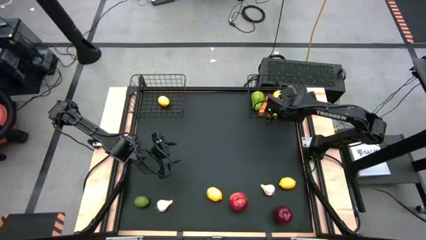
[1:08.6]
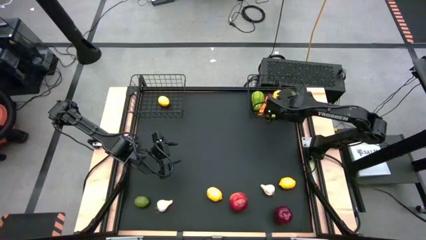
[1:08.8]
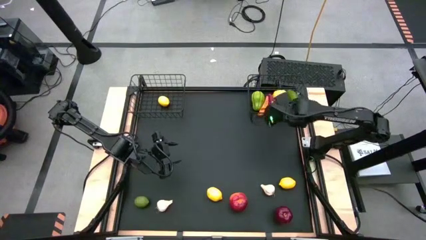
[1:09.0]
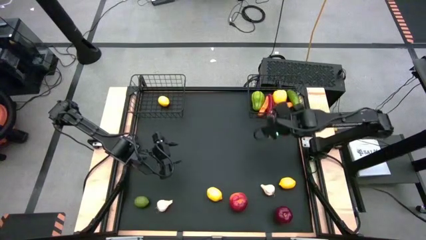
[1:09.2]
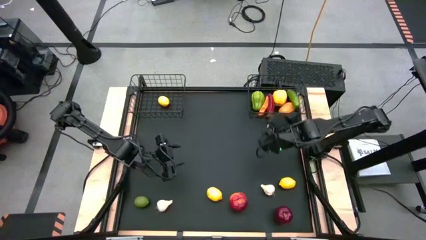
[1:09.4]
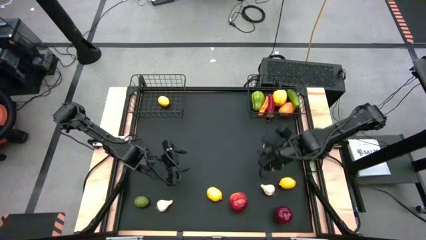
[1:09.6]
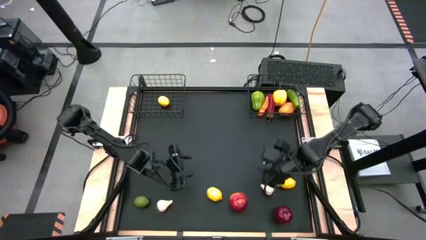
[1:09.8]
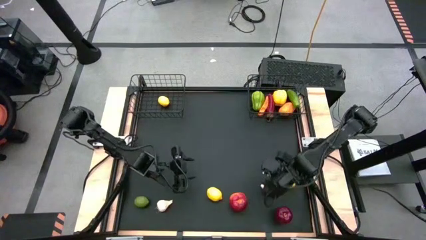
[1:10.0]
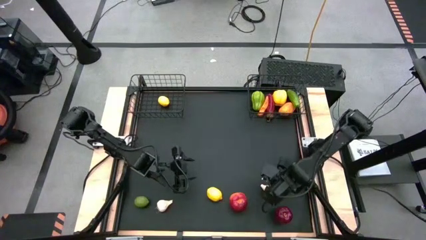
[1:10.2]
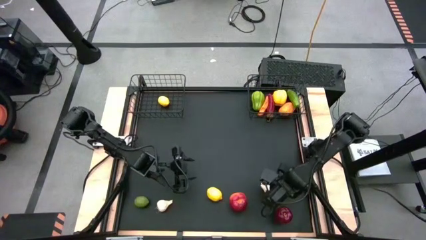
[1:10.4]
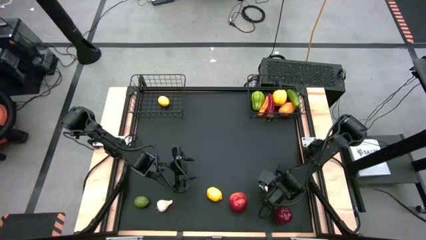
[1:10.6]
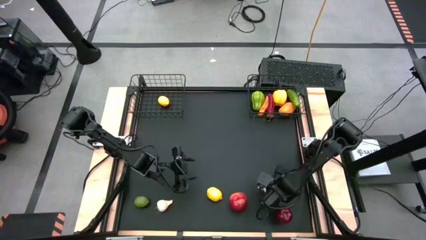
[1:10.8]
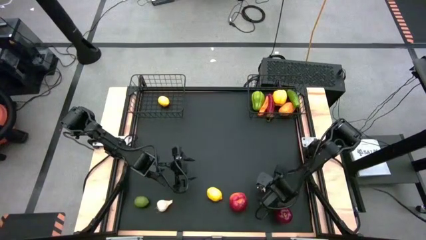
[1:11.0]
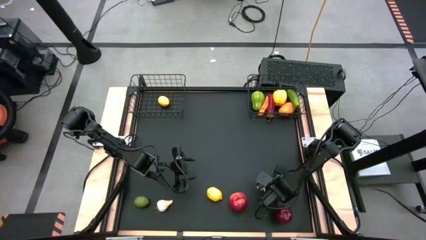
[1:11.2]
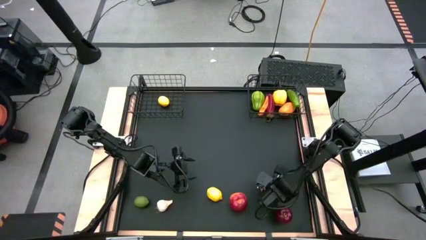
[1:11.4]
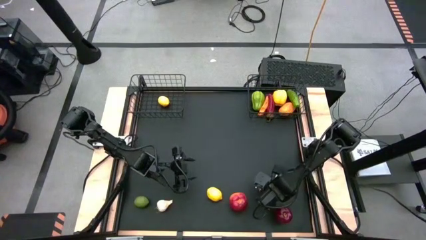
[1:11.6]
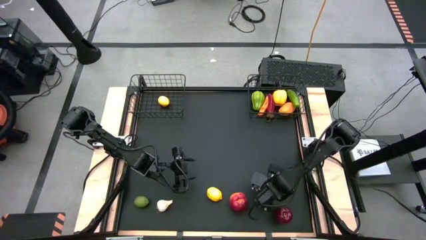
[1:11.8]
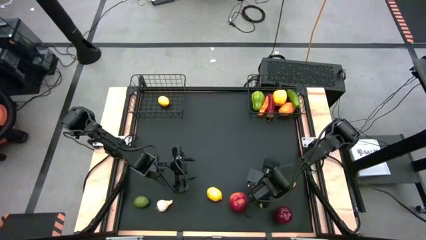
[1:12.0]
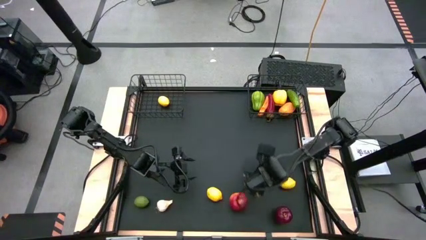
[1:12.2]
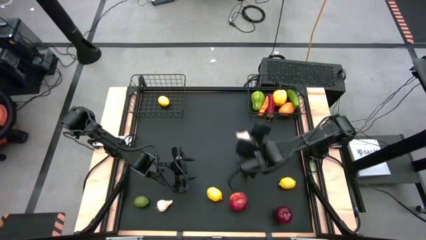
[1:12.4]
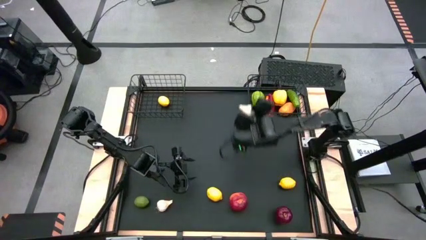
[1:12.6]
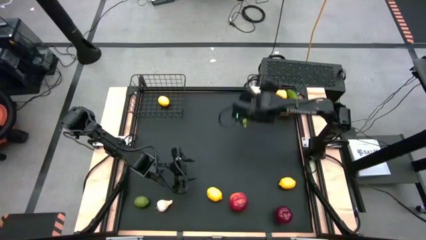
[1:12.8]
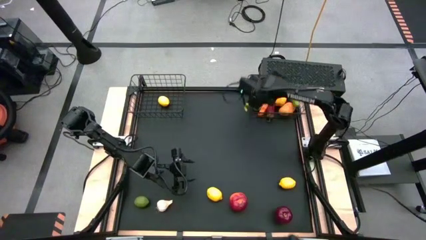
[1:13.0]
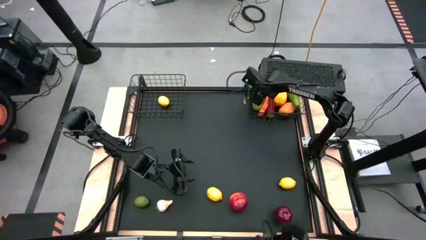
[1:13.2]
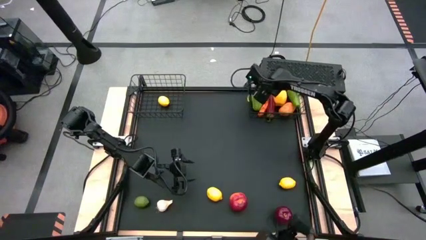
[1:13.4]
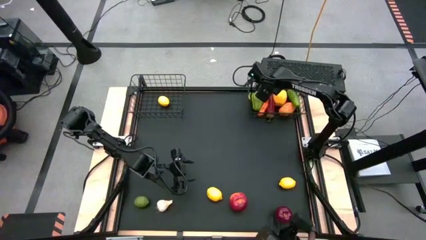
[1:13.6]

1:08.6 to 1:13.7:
Task: Sort produce into baskets
Put the right white garlic into the right black wire basket

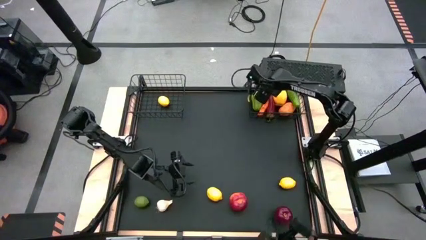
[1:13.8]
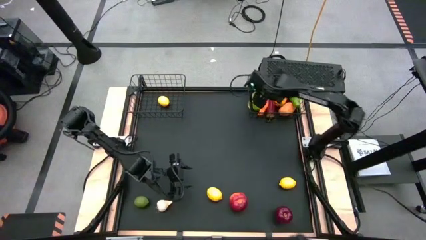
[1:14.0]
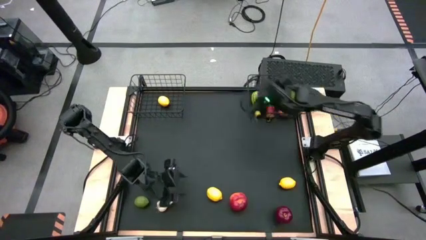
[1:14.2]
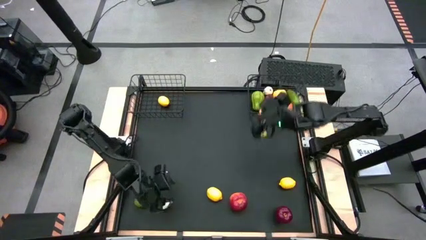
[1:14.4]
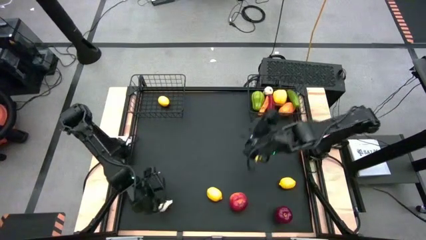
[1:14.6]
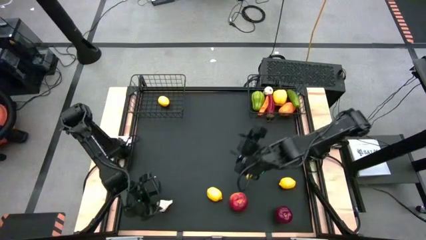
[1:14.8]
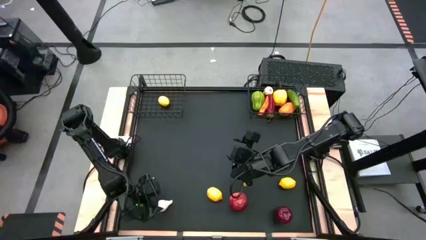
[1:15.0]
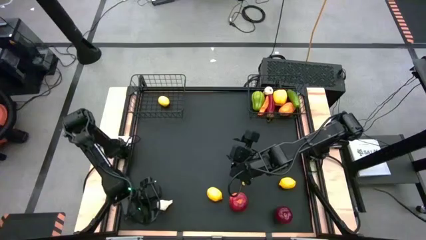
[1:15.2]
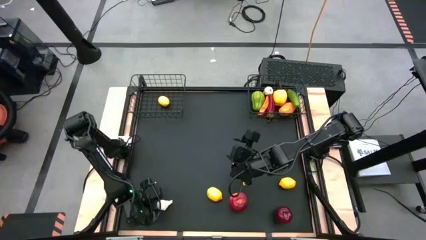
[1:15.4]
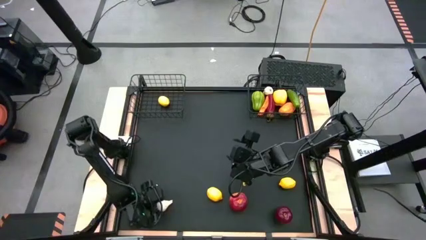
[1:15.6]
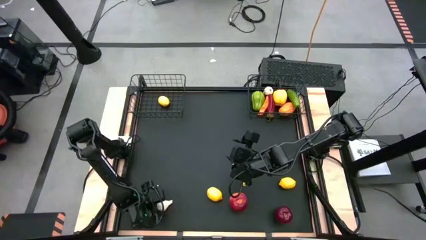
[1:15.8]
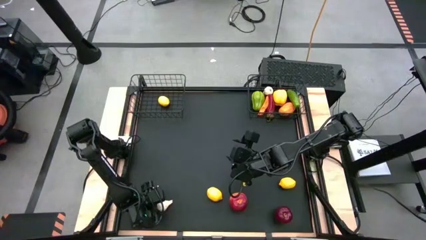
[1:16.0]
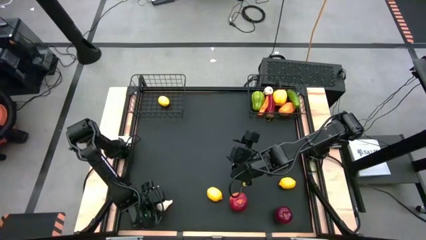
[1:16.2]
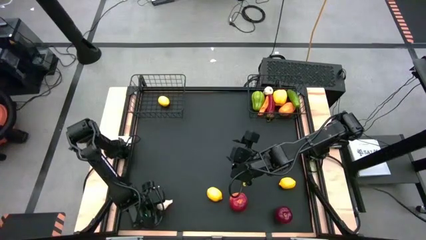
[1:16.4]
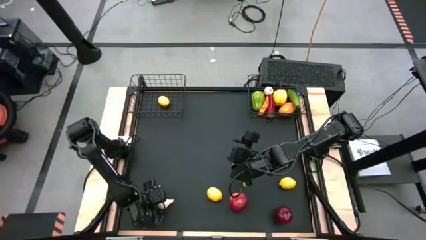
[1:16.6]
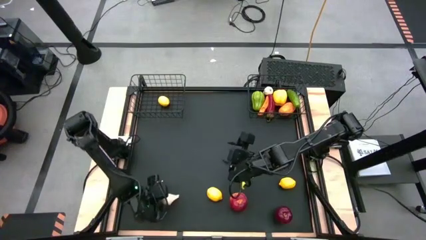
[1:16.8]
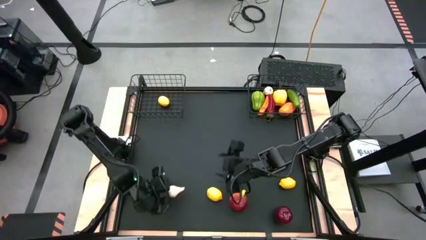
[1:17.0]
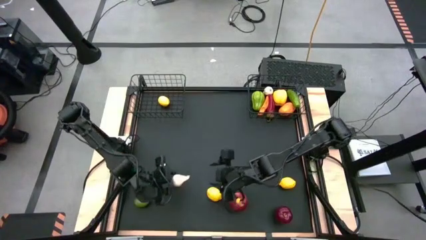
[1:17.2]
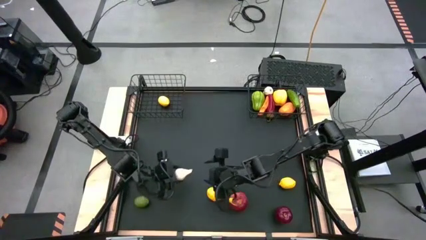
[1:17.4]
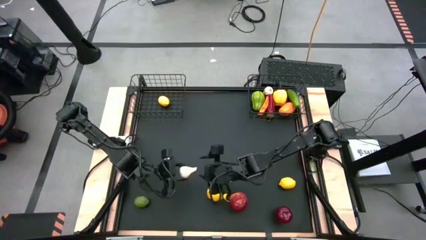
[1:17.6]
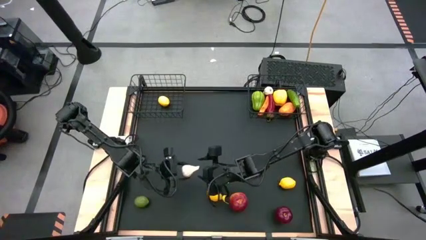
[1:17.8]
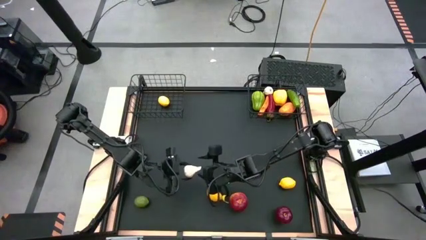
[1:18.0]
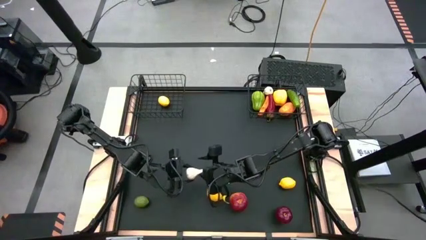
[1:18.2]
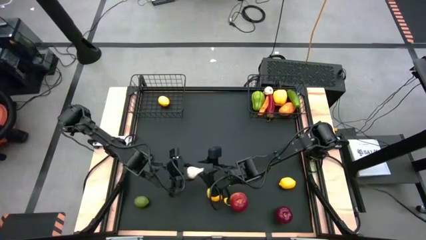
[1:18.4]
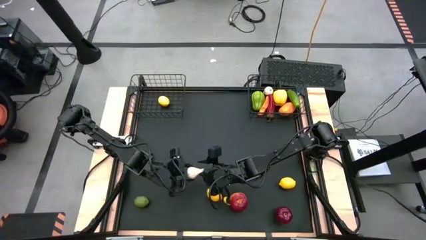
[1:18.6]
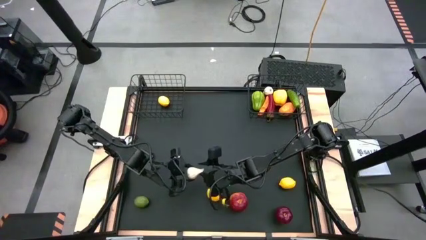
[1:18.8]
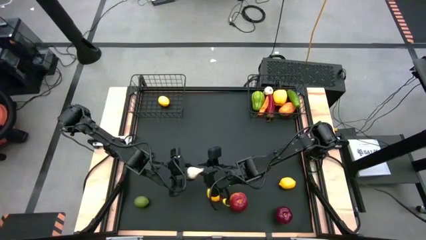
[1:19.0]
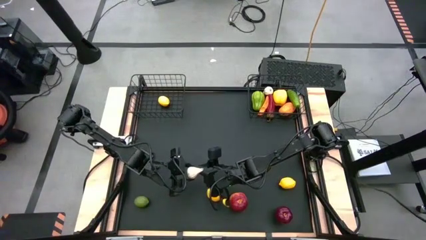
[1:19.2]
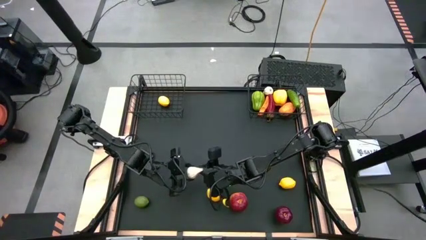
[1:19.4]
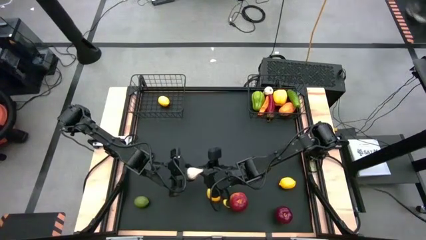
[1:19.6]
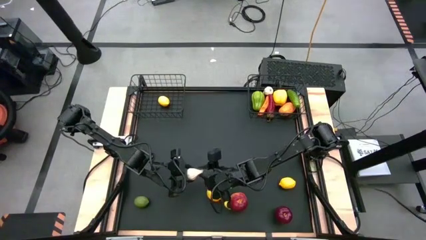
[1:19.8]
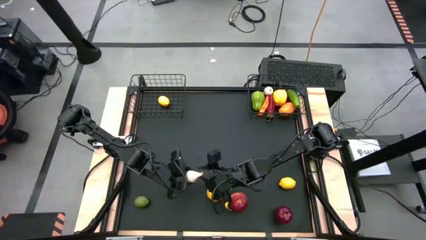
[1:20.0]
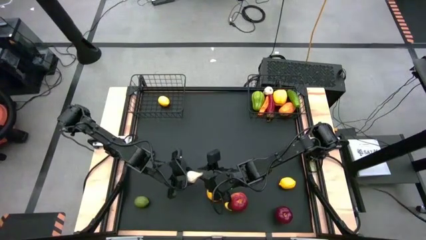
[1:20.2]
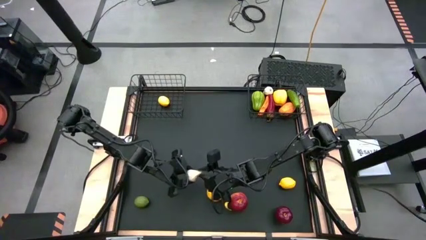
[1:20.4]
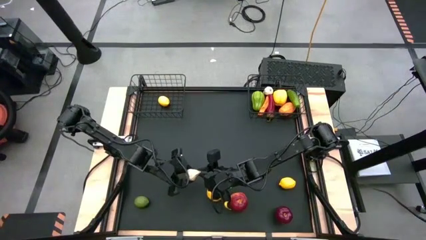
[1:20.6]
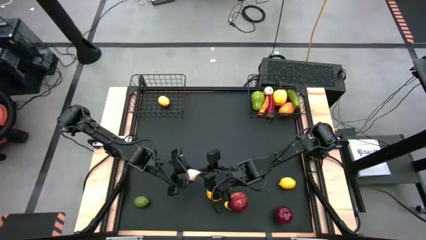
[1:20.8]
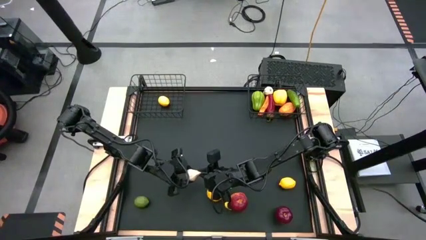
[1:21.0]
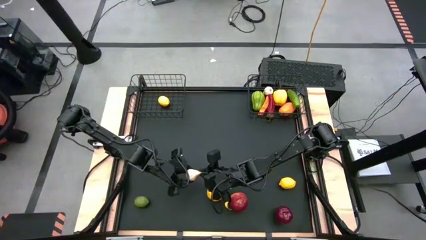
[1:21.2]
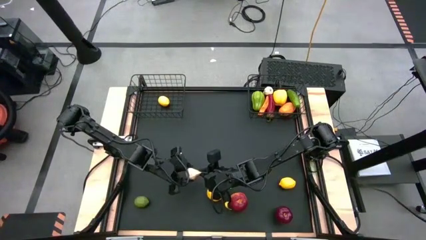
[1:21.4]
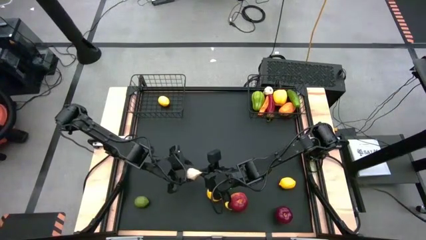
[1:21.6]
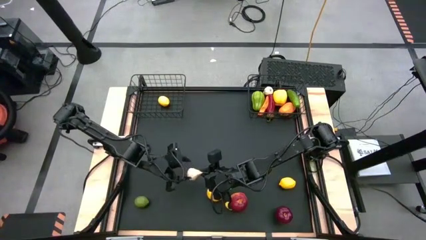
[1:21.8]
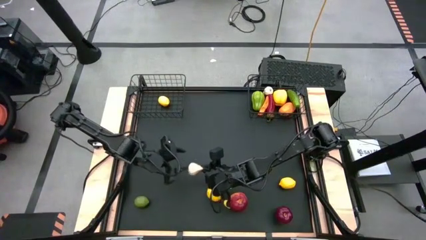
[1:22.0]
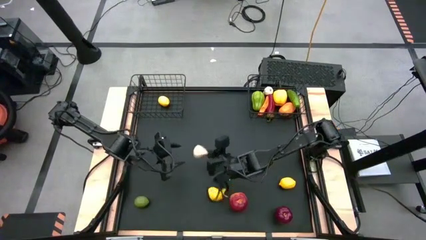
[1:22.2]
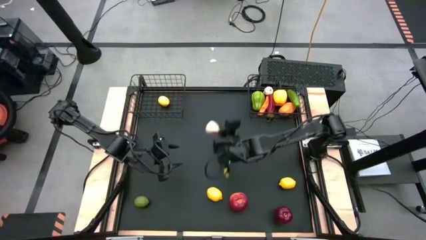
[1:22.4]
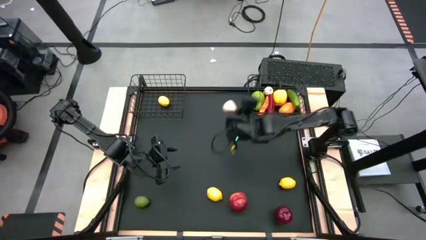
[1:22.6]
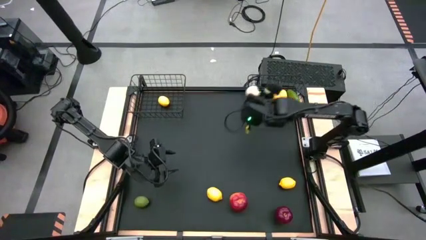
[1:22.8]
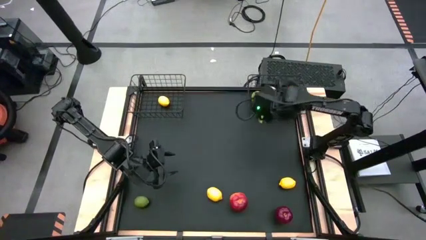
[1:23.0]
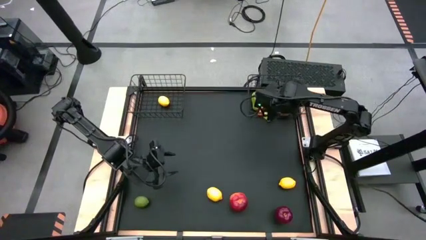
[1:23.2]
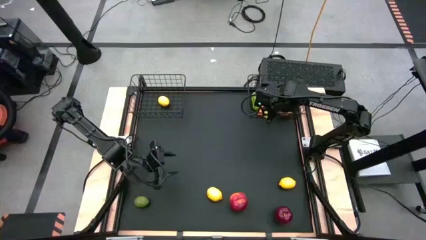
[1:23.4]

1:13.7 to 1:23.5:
Put the white garlic into the right black wire basket

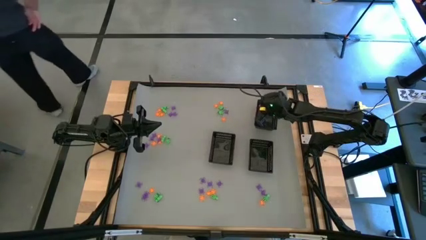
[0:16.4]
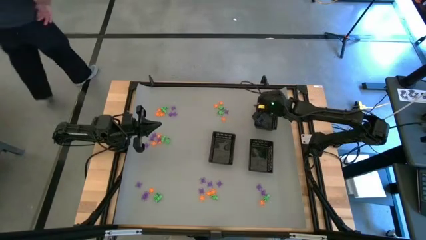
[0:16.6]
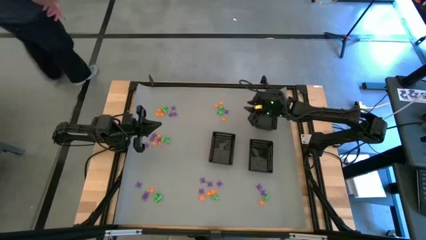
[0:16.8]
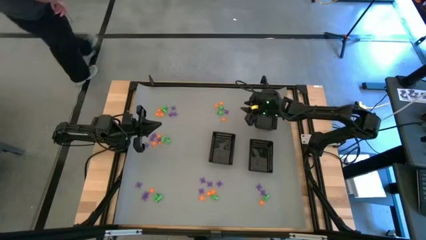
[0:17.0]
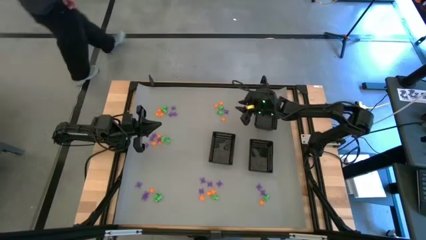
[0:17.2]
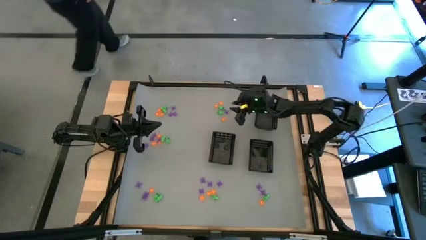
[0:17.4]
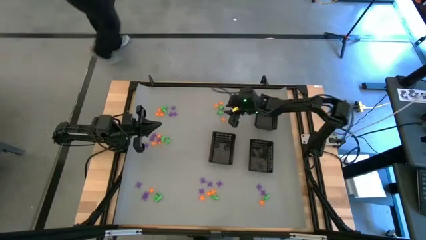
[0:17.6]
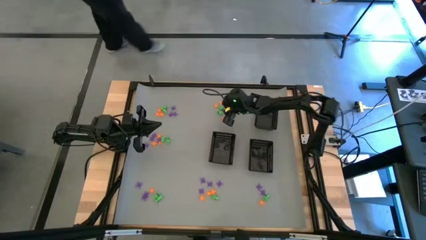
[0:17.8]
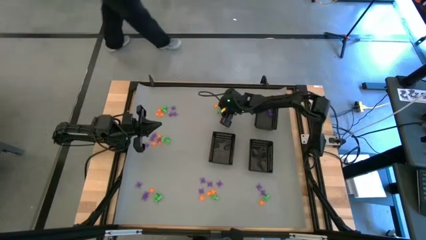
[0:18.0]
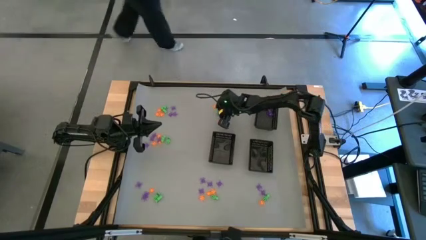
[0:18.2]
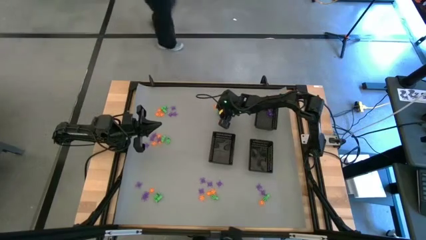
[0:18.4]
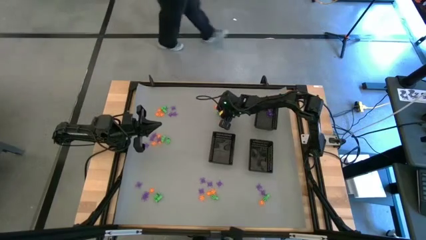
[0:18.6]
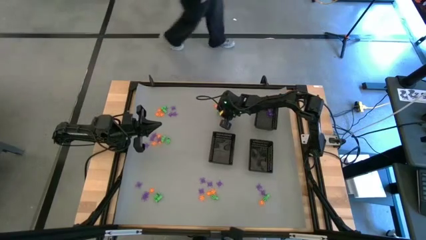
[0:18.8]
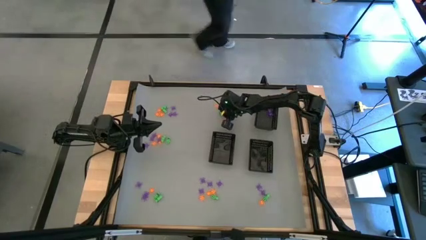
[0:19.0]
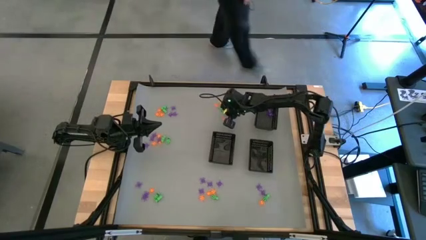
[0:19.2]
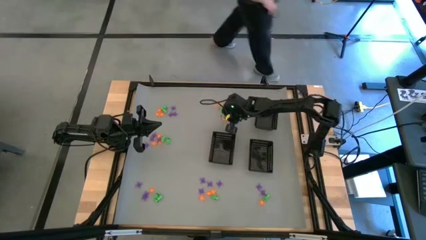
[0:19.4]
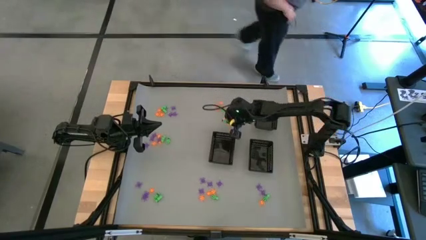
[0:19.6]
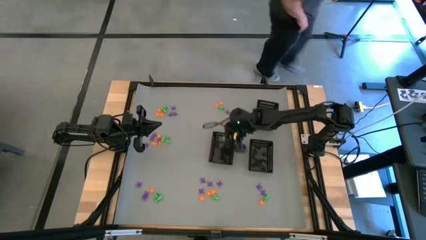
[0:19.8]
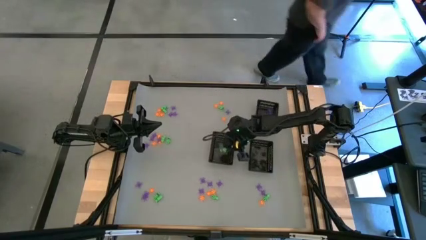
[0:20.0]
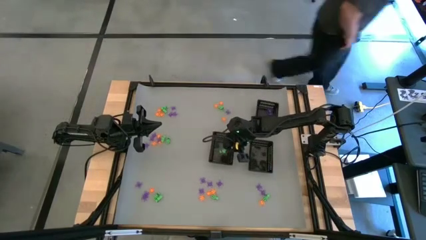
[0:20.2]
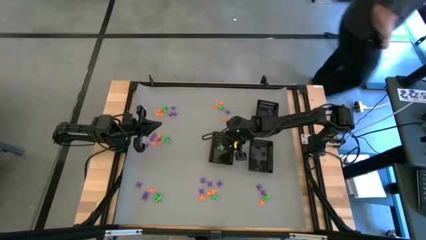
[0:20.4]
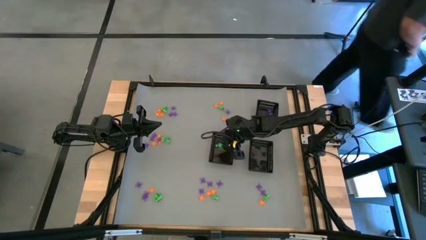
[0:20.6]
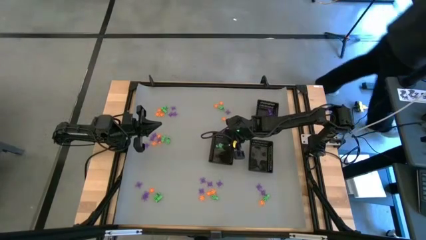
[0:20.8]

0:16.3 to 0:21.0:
Task: Sort Halloween decoration
Put the green skeleton toy into the bottom left bin
